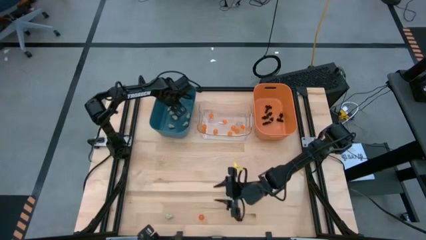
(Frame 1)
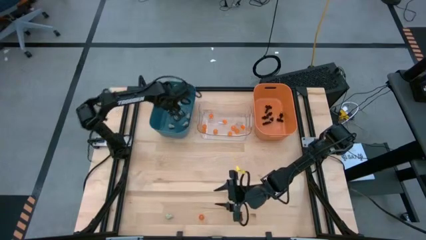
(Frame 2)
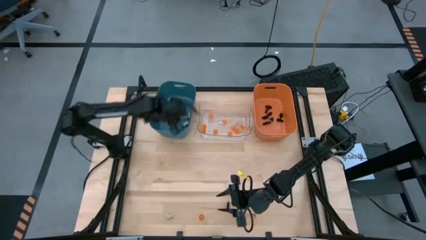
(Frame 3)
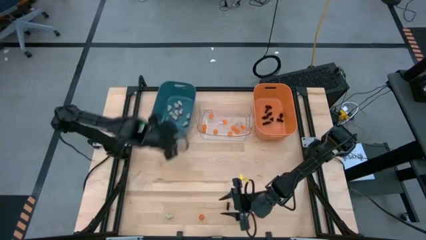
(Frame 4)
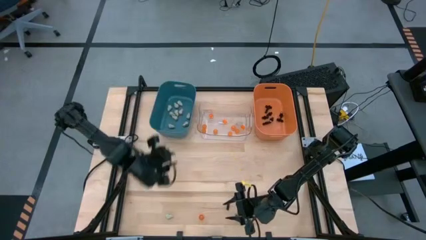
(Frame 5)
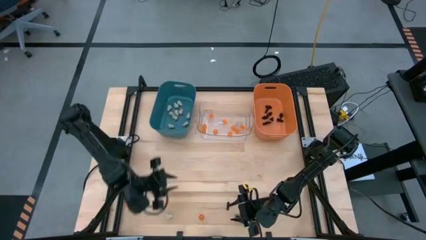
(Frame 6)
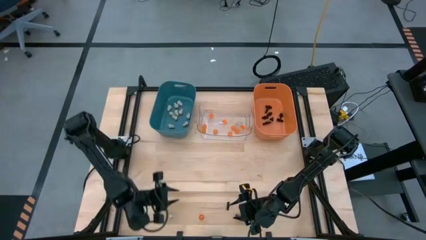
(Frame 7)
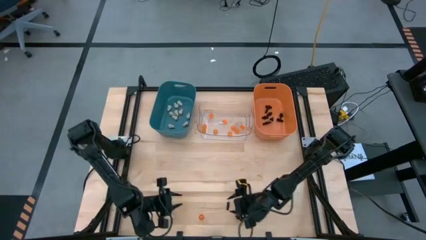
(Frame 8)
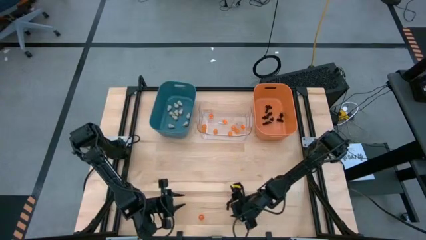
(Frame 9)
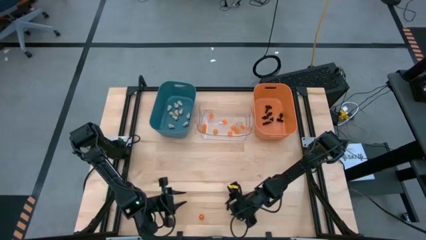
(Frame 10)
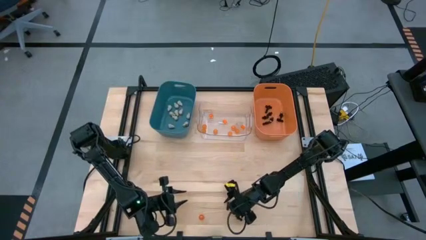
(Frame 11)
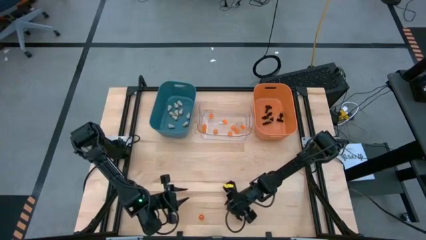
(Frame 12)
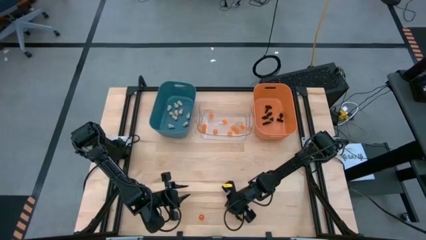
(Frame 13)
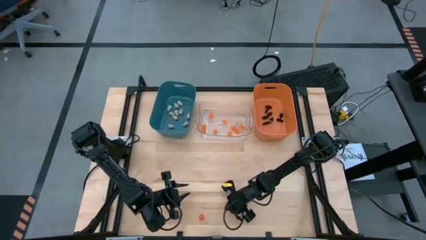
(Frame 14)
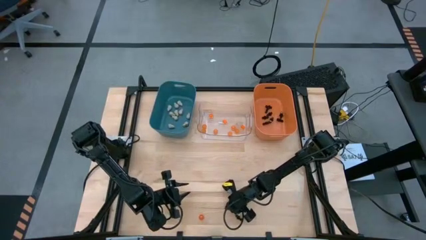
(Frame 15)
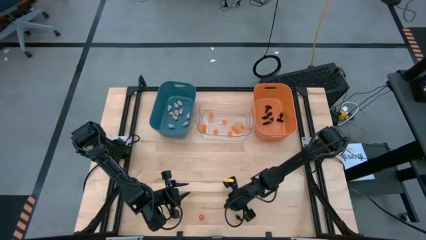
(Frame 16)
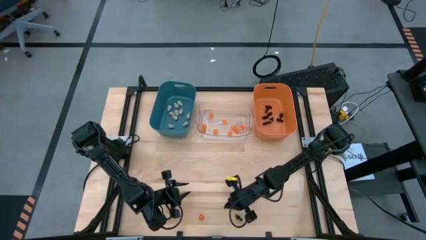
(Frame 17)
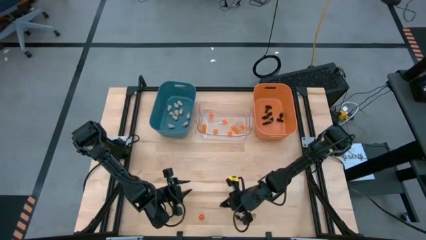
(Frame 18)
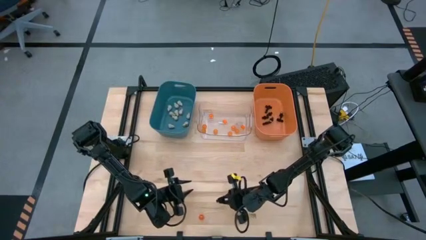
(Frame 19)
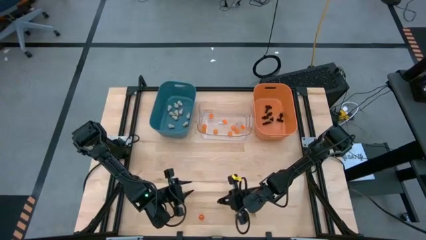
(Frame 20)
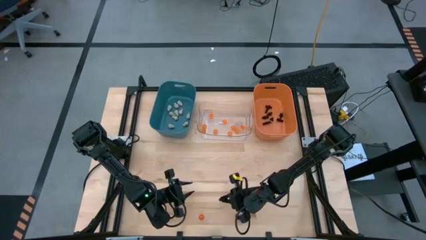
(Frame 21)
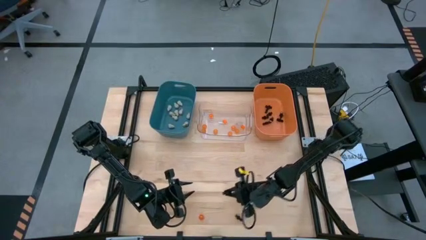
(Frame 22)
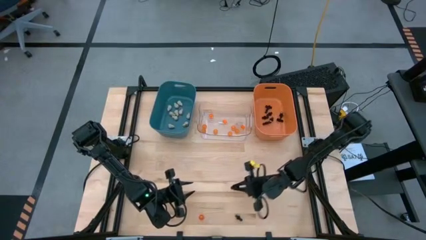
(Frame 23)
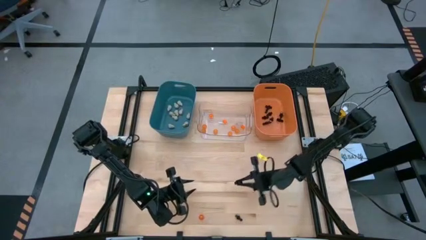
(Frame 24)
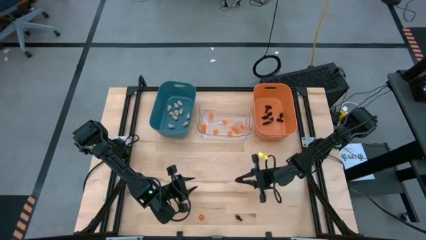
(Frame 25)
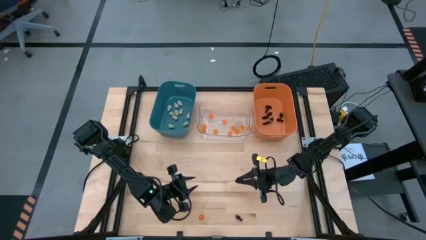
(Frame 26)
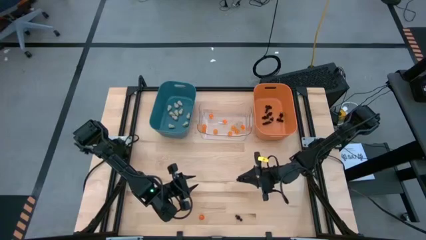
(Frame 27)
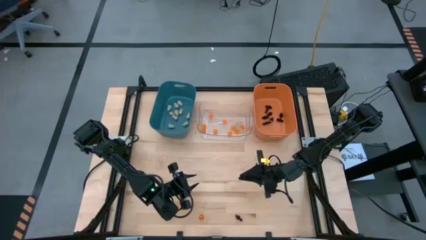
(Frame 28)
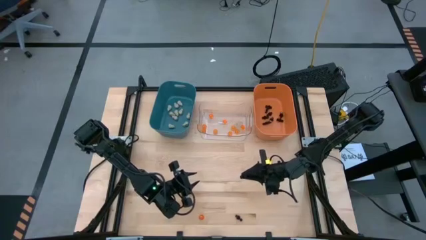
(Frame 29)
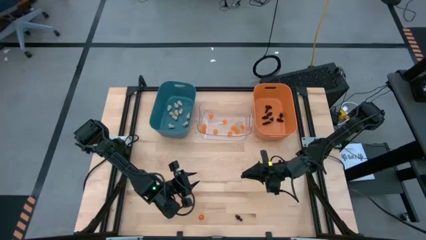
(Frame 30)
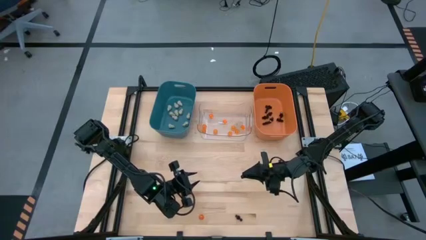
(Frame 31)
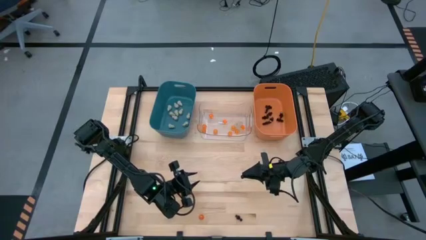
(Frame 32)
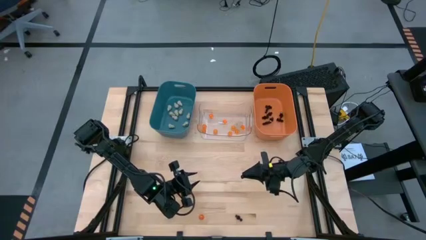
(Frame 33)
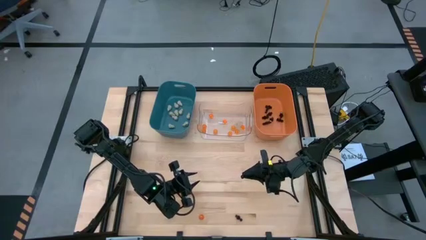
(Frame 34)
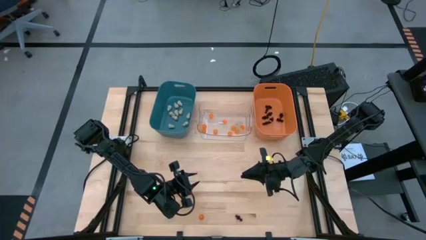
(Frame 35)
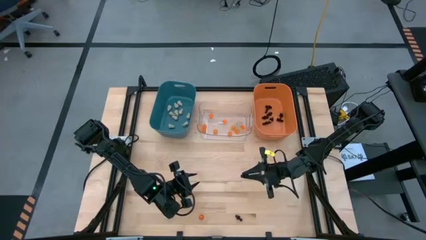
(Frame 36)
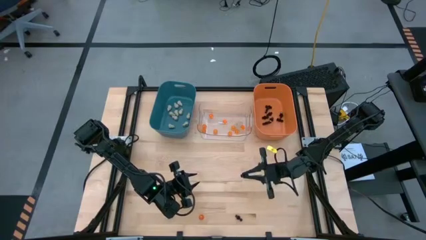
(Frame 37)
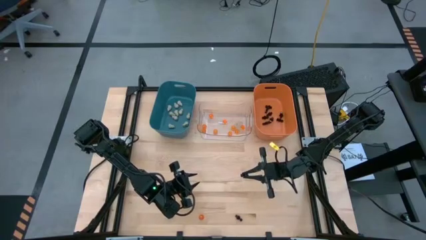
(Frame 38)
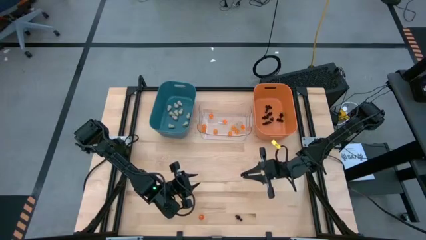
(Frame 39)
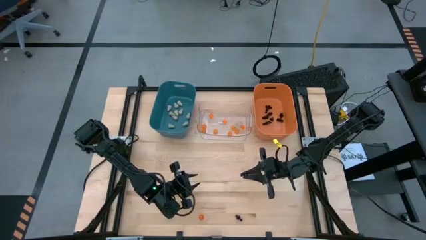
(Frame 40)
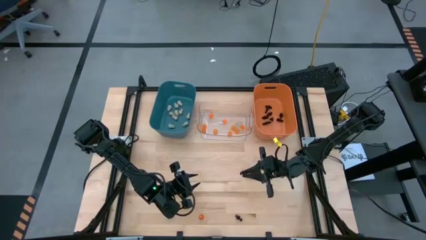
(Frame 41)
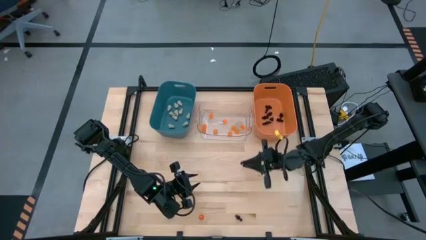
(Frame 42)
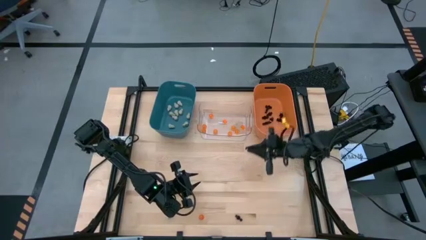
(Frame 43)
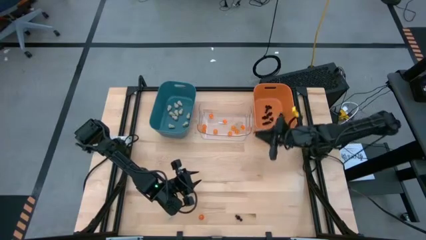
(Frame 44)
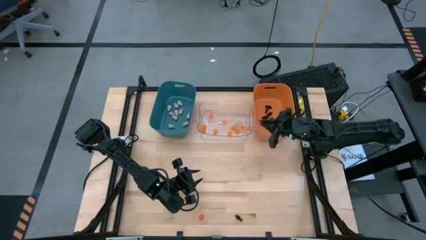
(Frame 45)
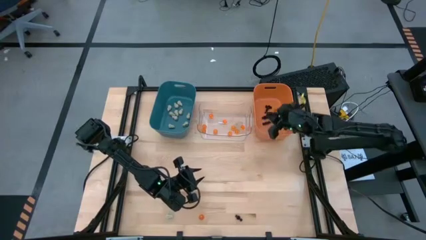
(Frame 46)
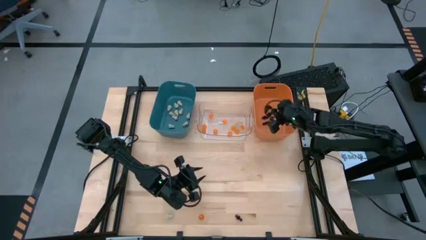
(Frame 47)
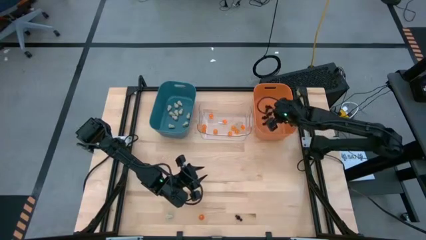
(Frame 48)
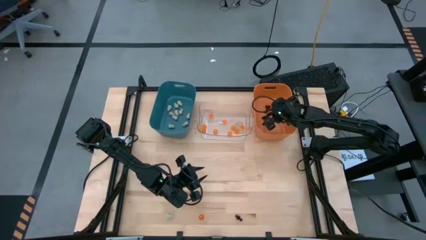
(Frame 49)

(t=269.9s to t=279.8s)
Task: Sort Halloween decoration
Put the black skeleton toy into the orange bin

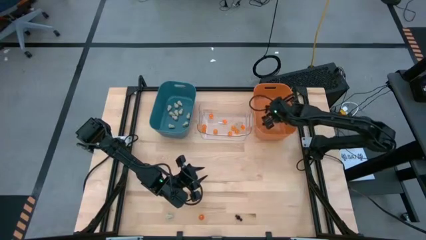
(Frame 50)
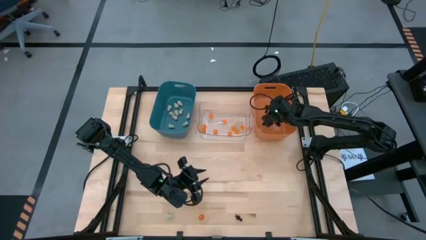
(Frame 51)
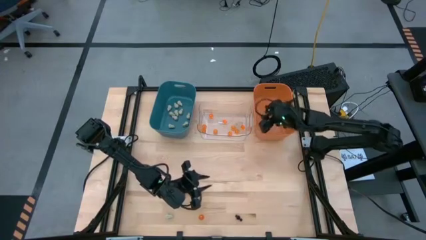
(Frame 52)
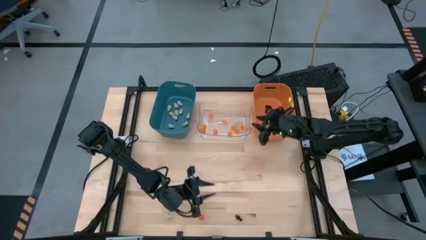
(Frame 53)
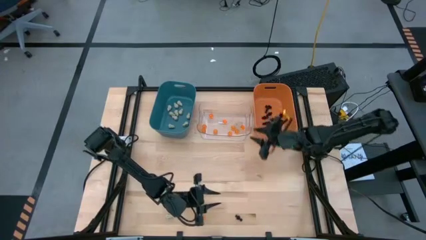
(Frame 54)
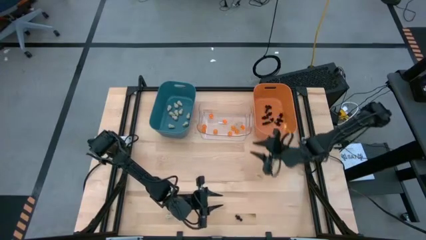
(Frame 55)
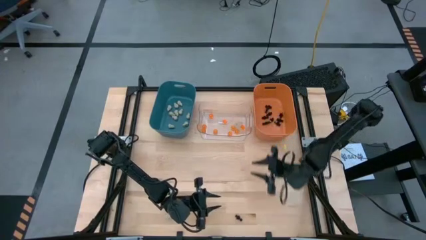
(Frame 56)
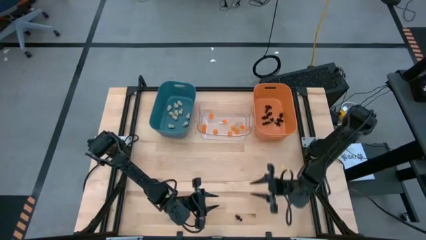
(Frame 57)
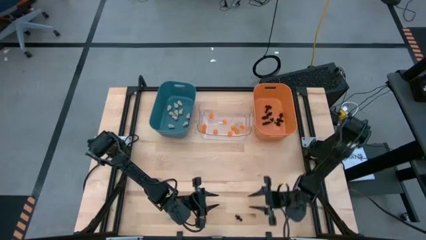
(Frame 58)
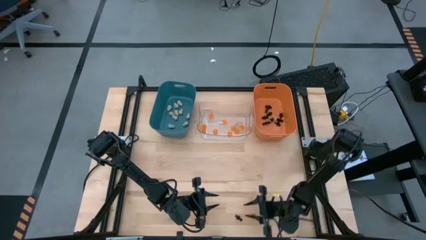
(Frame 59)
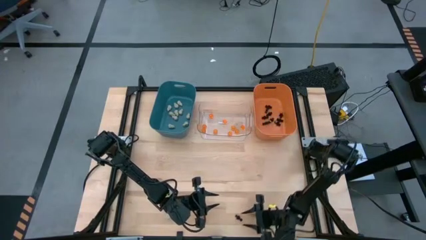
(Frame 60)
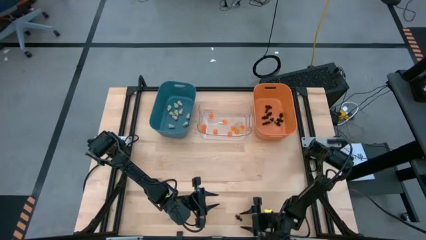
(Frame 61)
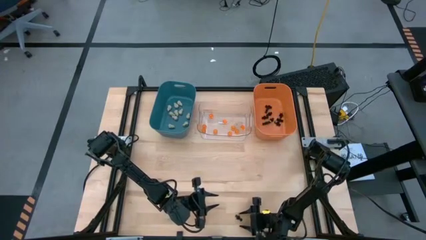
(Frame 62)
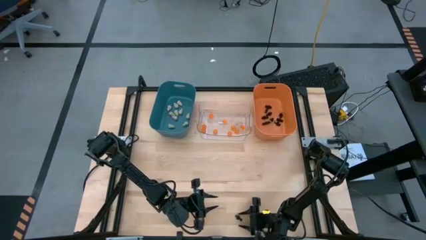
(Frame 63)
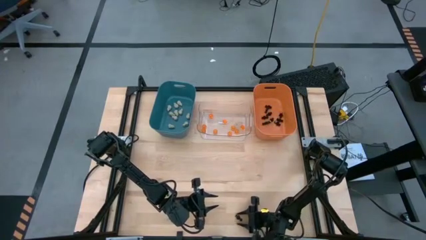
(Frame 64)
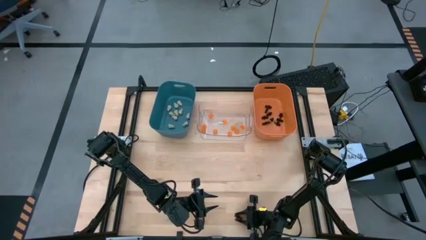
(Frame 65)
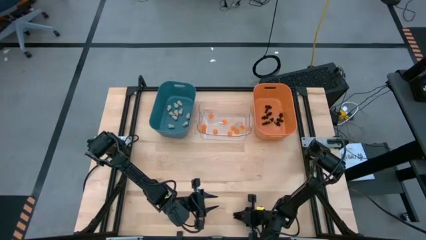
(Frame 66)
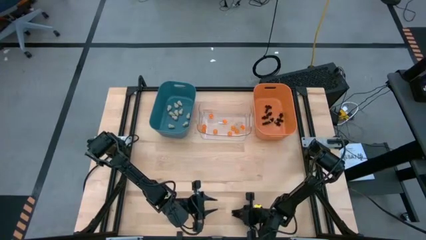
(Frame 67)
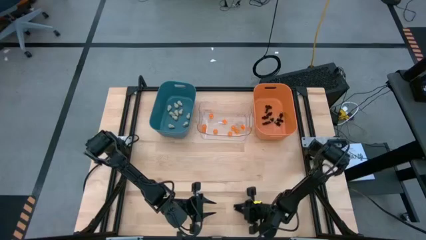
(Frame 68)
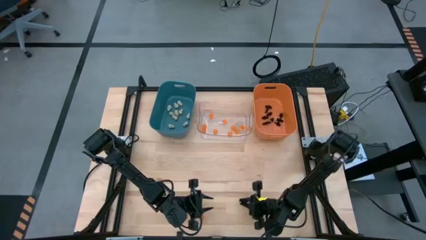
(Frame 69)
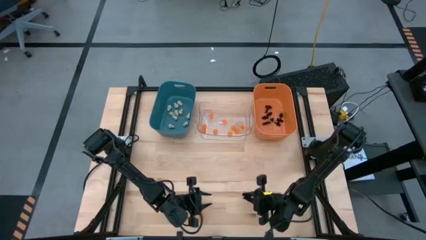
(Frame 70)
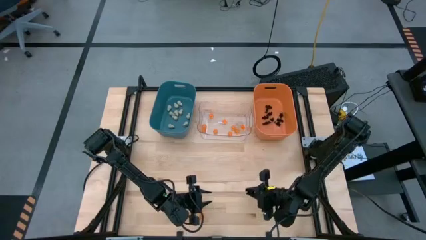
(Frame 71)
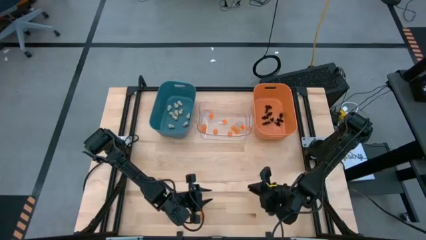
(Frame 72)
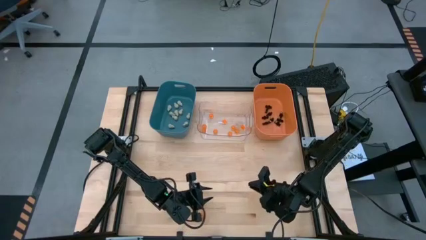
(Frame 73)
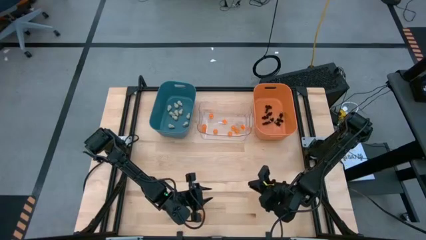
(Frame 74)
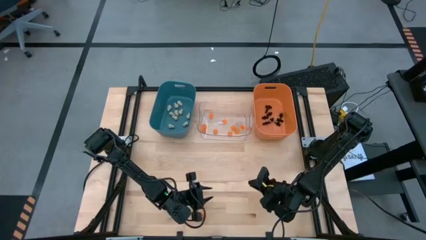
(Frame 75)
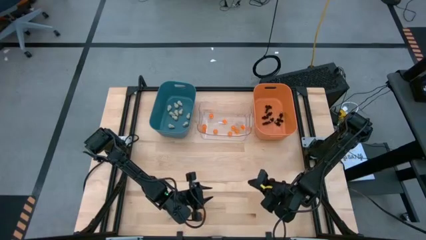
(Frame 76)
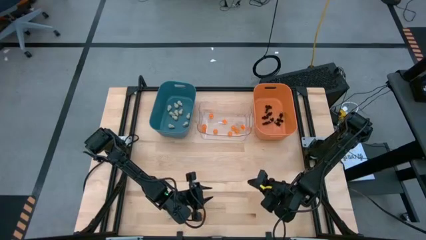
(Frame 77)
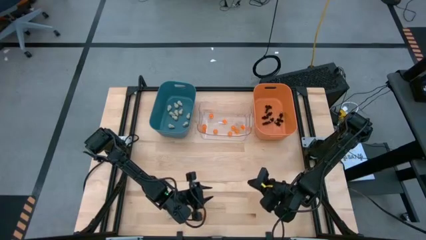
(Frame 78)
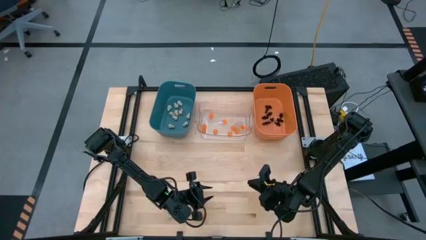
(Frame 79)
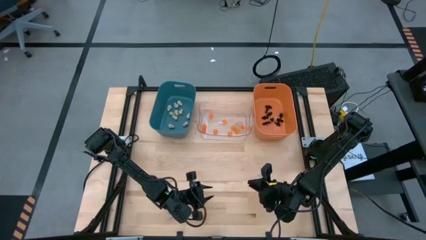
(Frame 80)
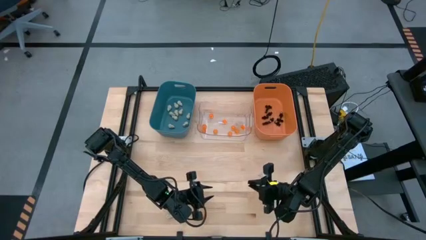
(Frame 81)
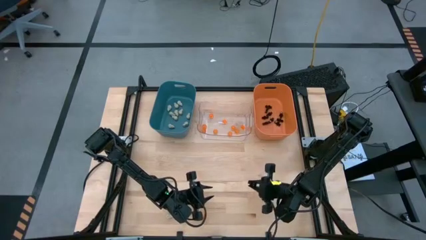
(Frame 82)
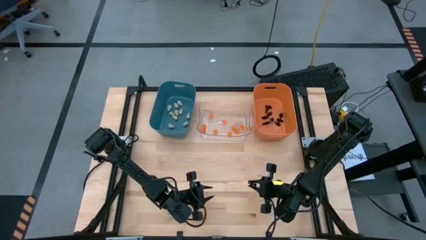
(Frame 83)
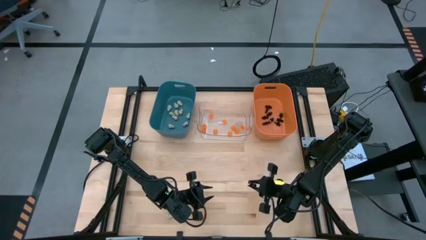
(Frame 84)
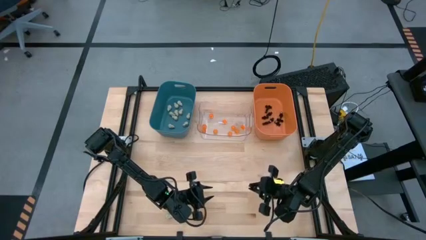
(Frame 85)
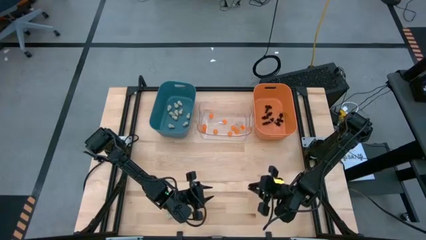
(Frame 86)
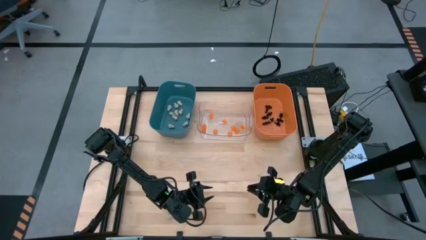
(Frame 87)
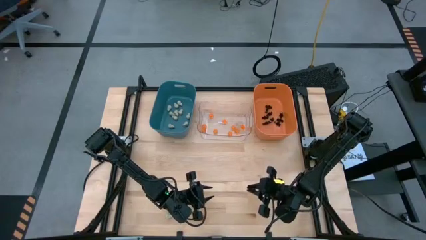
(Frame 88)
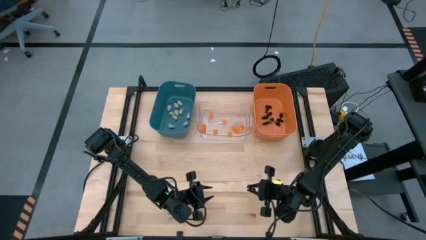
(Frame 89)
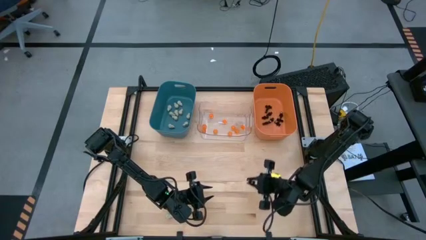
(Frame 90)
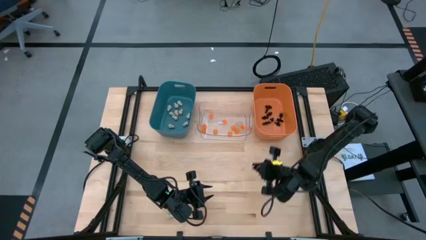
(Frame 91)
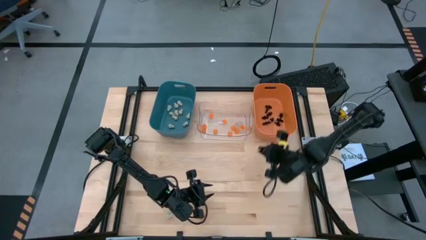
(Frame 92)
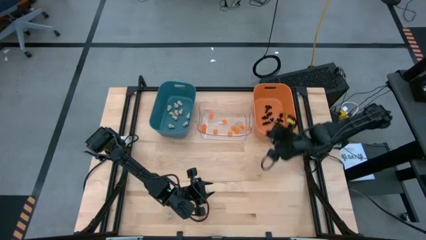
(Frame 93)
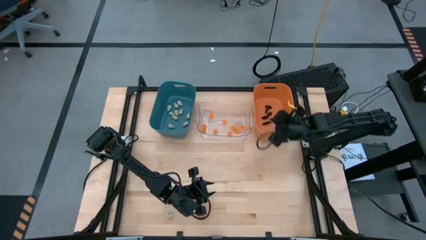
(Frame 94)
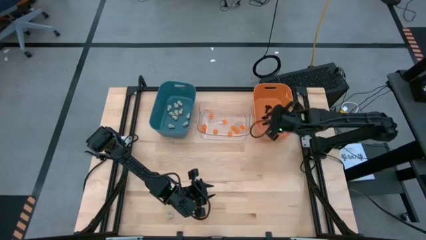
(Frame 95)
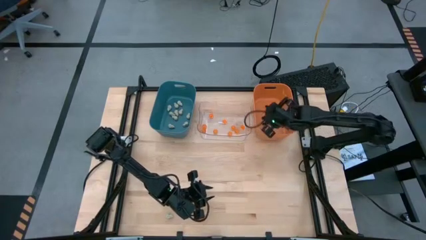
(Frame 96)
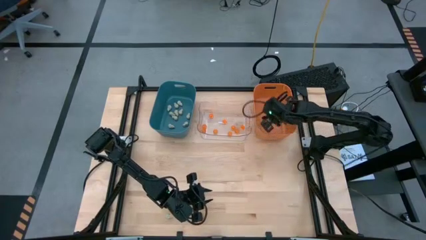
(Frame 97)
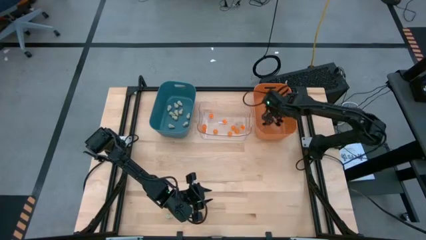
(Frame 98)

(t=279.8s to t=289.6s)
Put the black skeleton toy into the orange bin
